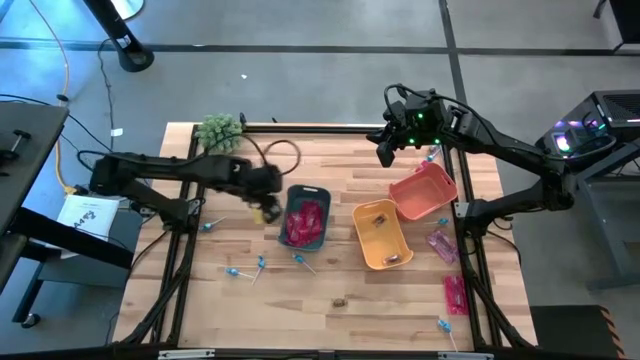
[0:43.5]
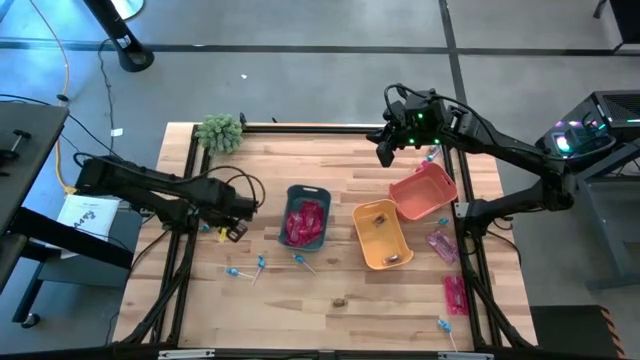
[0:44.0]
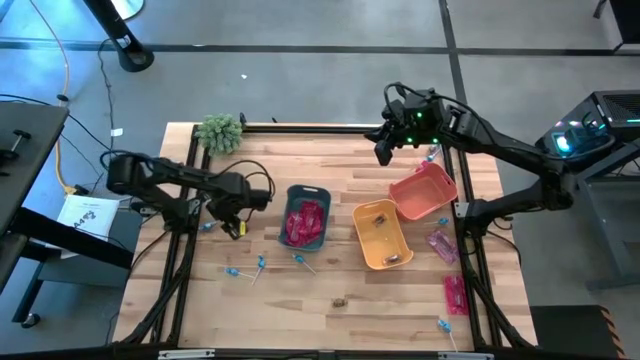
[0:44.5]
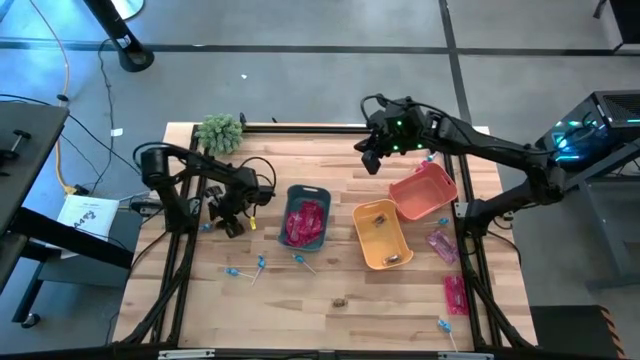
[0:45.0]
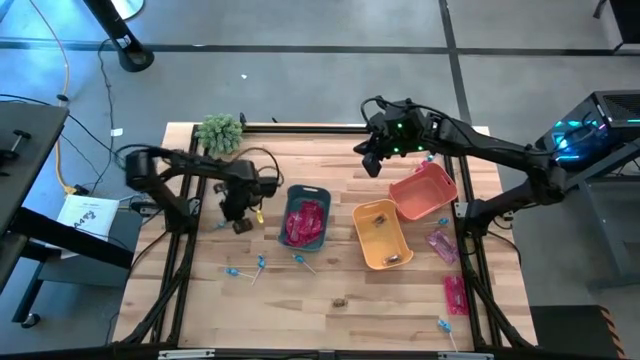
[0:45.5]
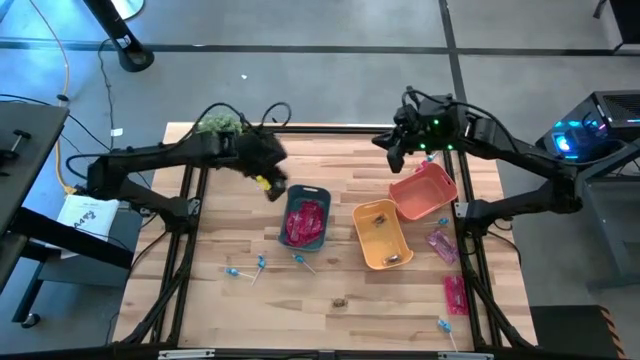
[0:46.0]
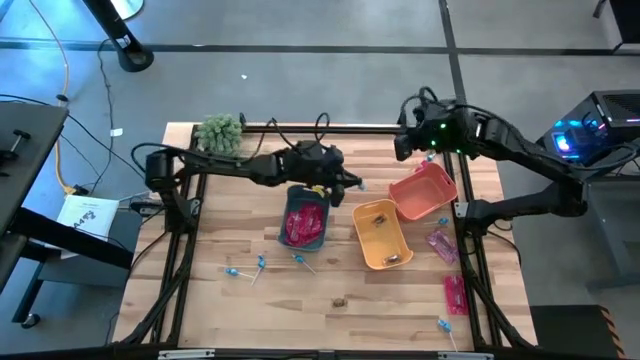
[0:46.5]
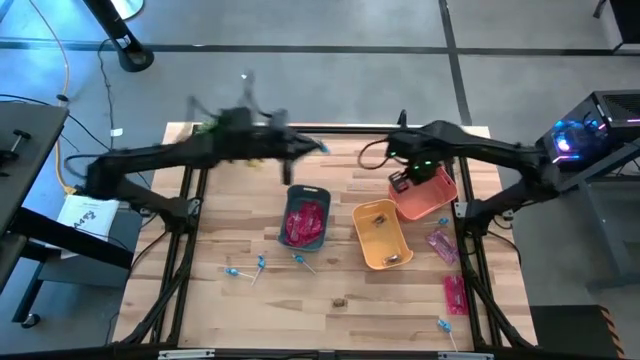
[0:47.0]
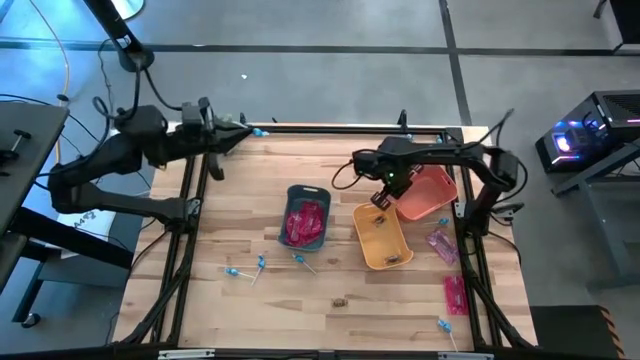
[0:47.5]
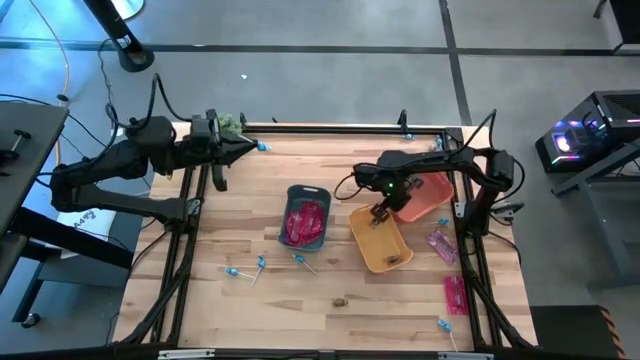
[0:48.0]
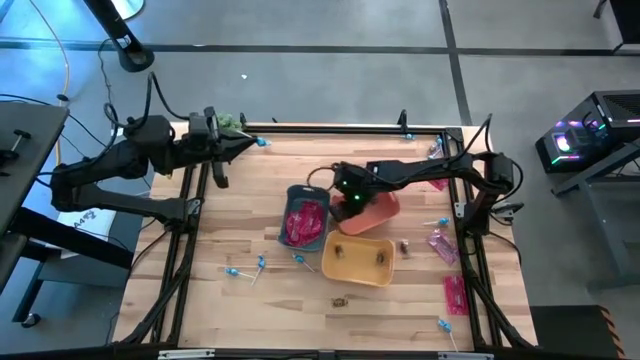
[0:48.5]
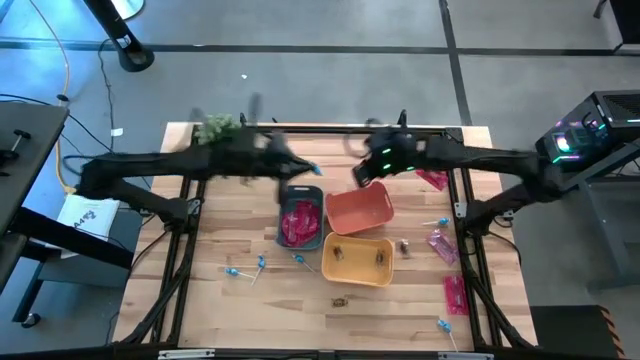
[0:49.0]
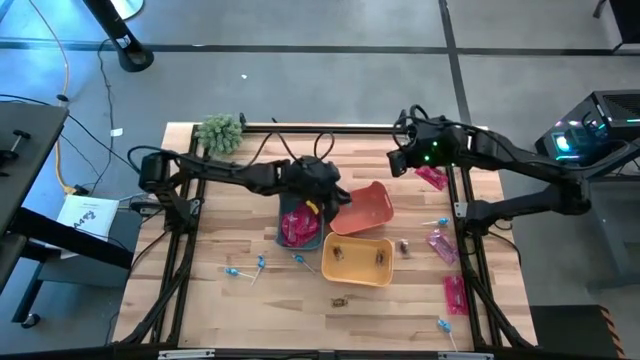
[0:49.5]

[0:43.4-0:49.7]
Task: Sort candy
Put the blue lollipop into the orange bin

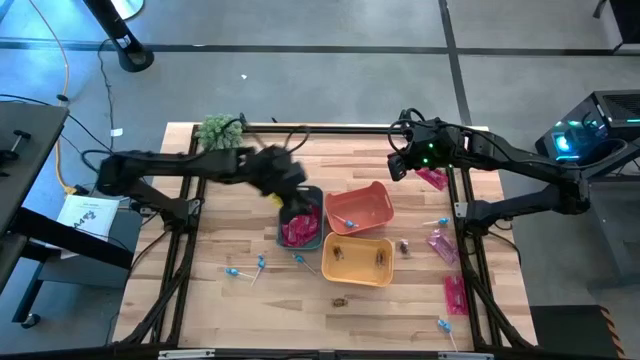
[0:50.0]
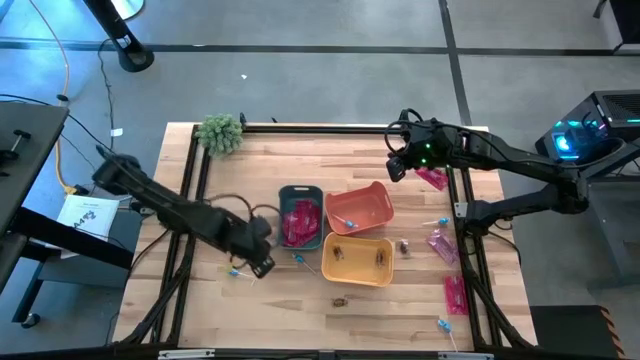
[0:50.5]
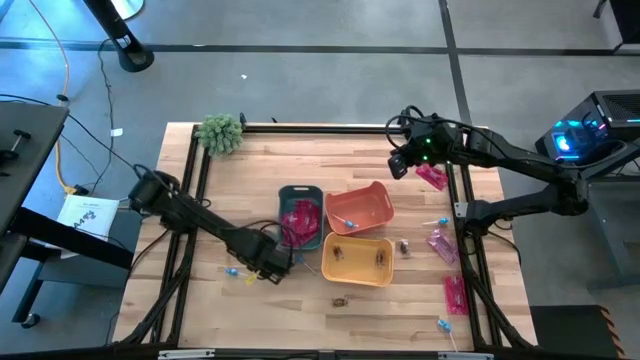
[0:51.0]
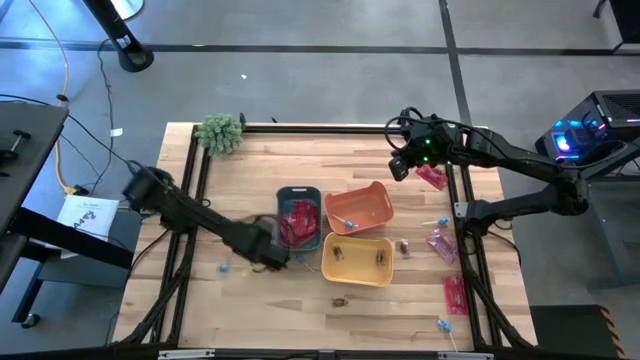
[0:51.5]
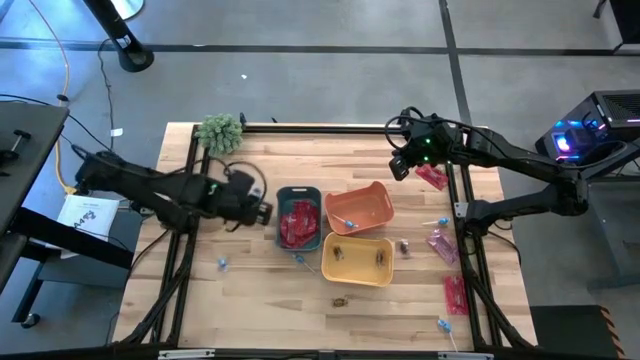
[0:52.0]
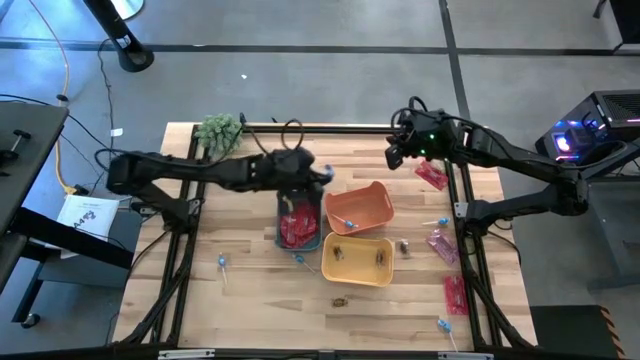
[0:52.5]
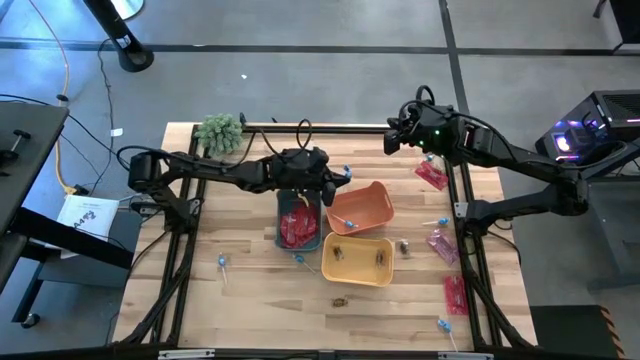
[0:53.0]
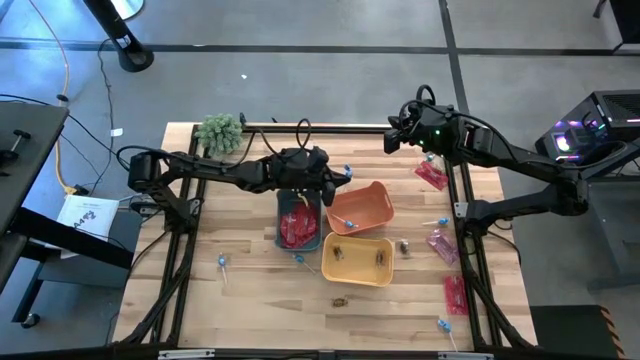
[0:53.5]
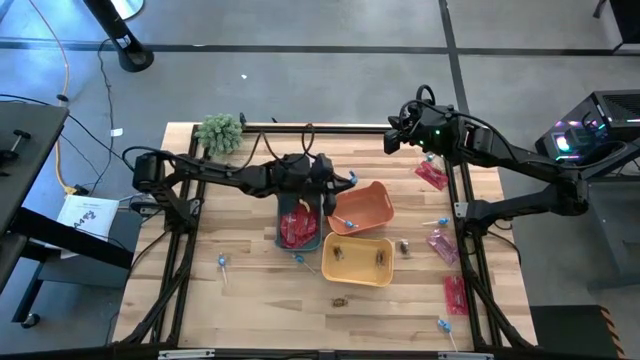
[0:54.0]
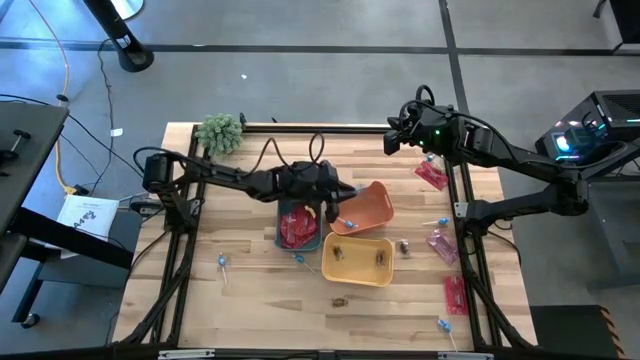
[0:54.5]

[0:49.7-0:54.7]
Put the blue lollipop into the orange bin

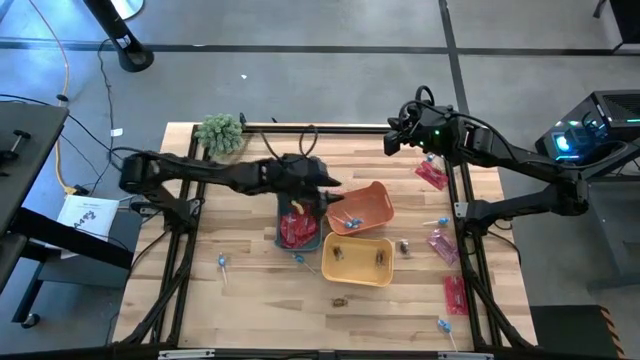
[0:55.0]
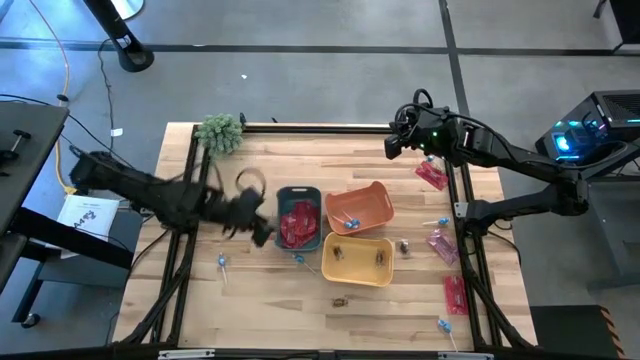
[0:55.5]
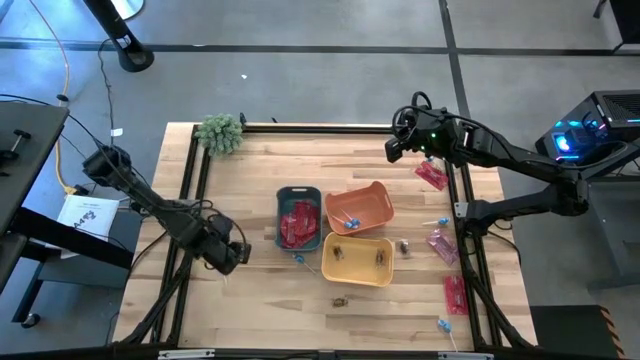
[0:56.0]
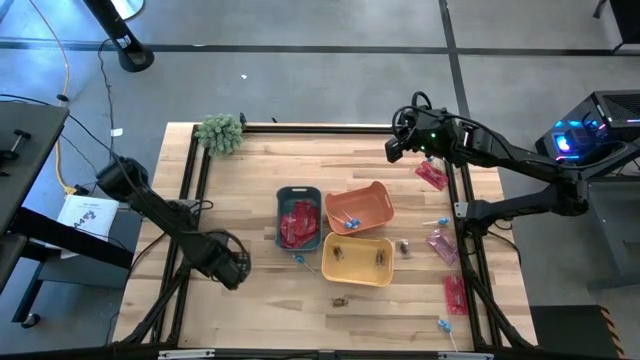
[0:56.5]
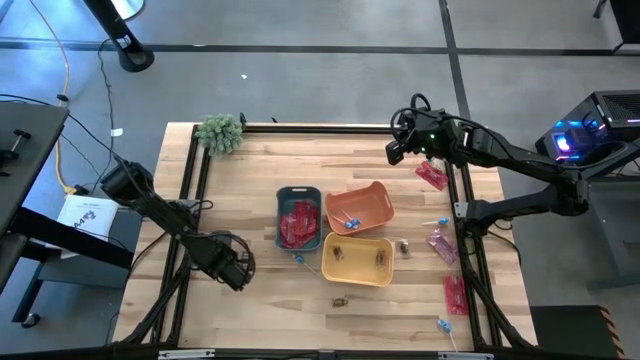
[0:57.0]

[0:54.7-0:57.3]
Put the blue lollipop into the orange bin

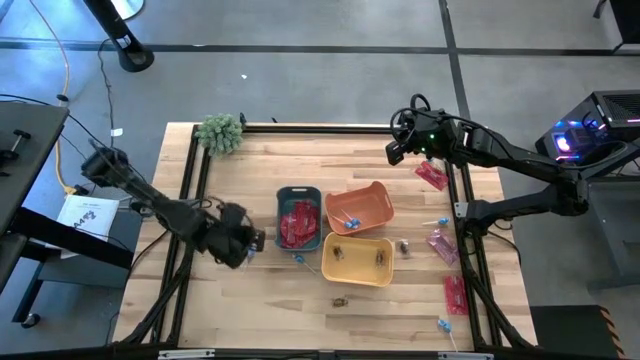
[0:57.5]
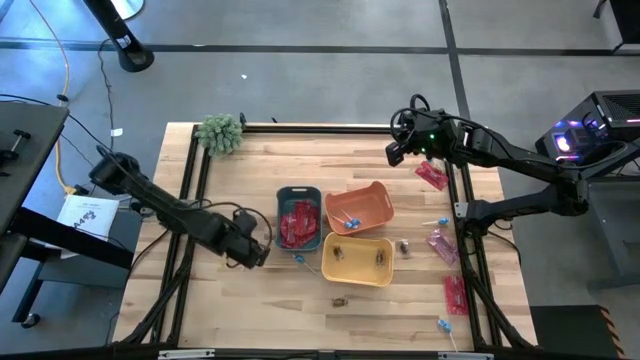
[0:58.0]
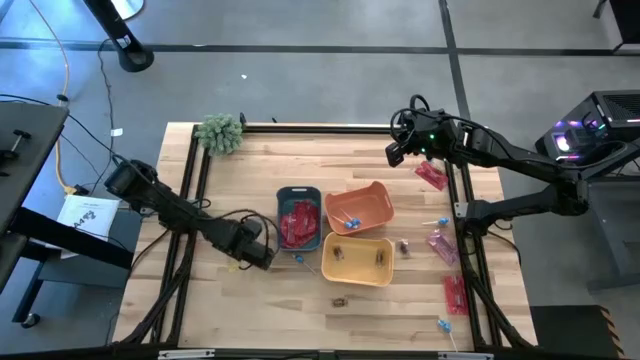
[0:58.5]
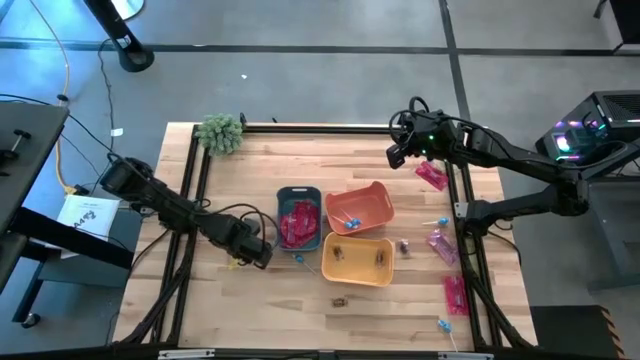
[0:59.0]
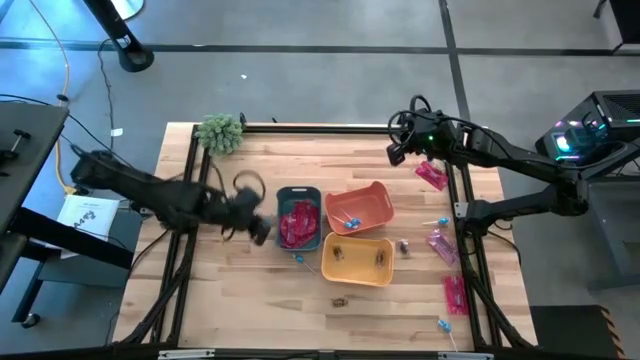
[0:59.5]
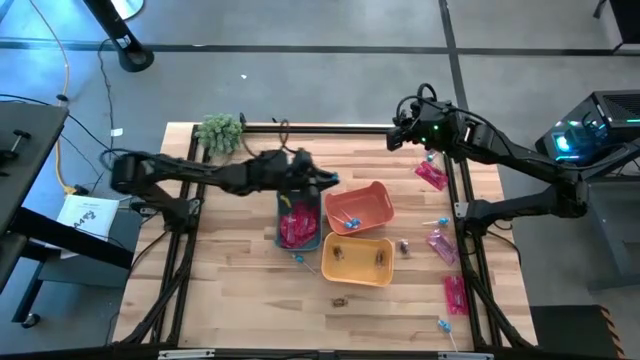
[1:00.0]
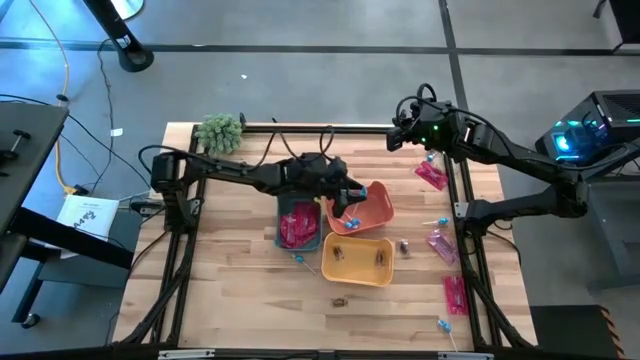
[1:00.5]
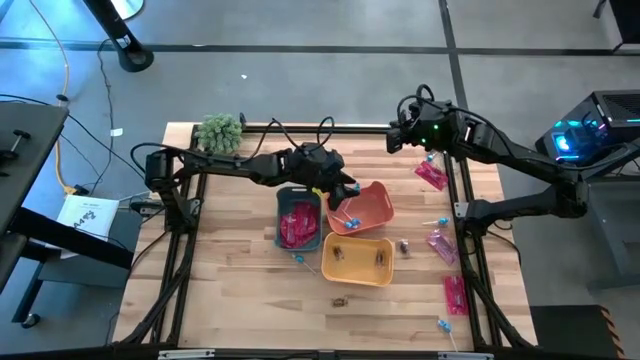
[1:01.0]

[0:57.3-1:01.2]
Put the blue lollipop into the orange bin

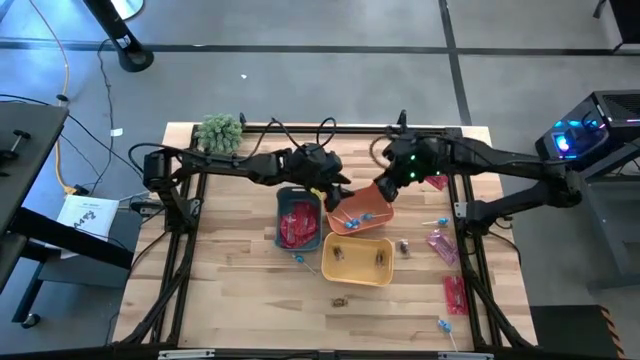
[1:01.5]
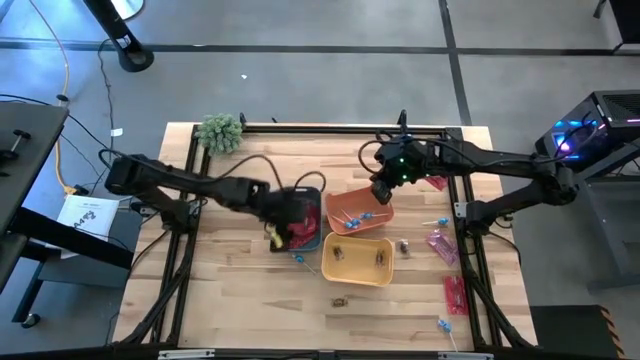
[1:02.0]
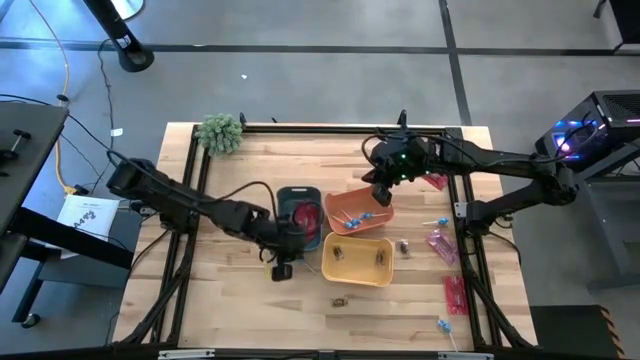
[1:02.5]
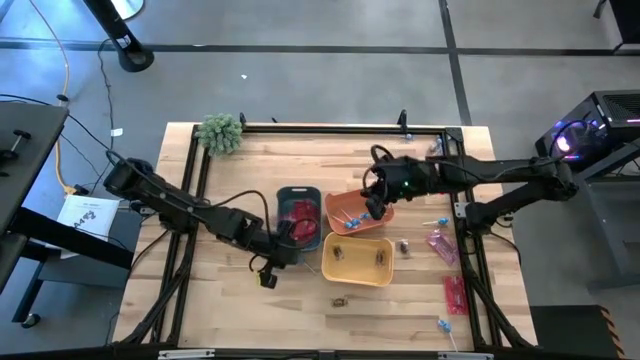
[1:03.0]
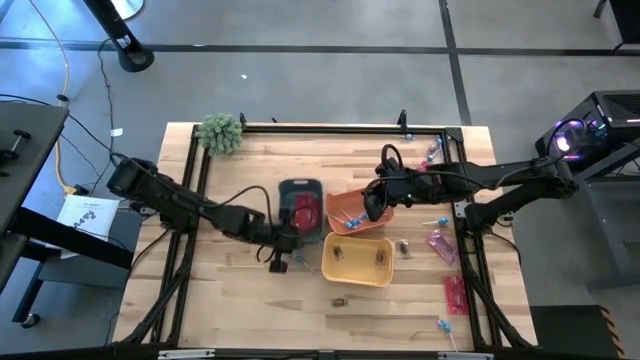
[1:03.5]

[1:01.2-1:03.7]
Adjust the blue bin
